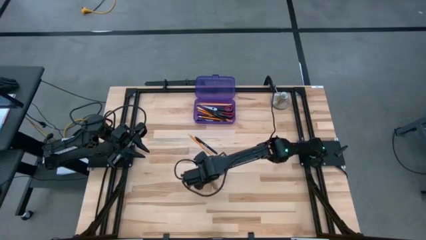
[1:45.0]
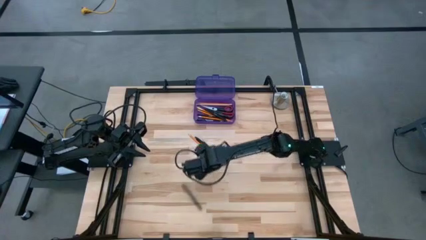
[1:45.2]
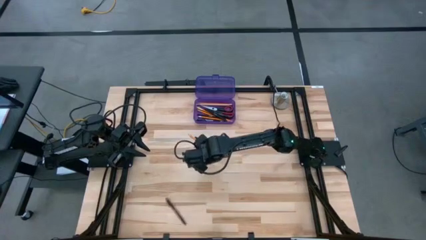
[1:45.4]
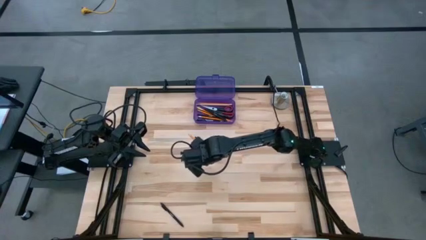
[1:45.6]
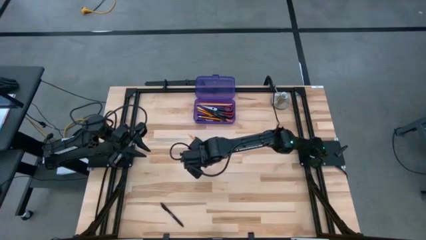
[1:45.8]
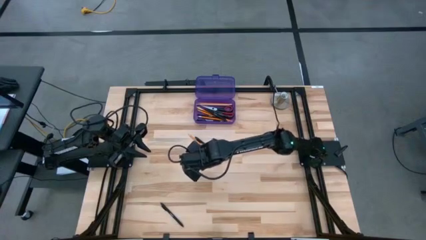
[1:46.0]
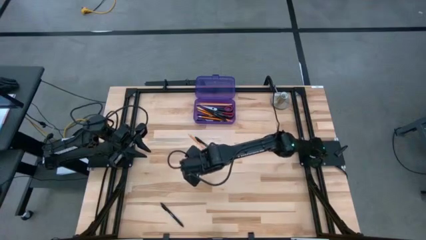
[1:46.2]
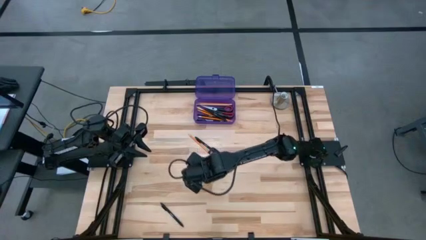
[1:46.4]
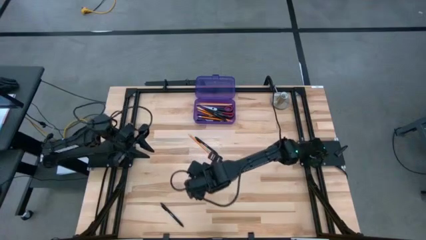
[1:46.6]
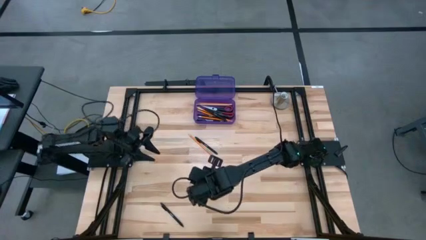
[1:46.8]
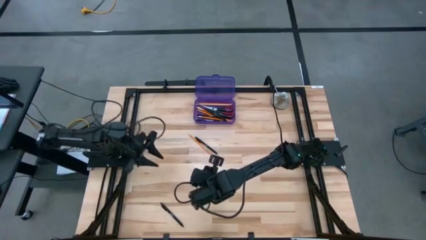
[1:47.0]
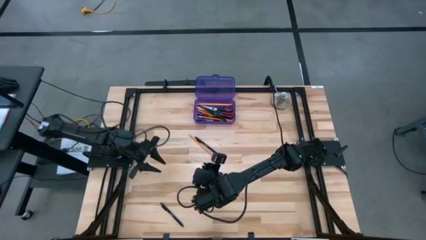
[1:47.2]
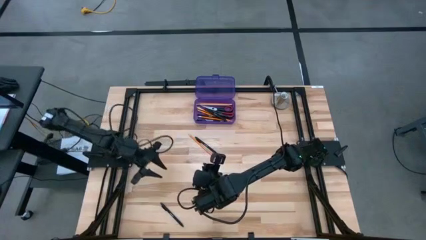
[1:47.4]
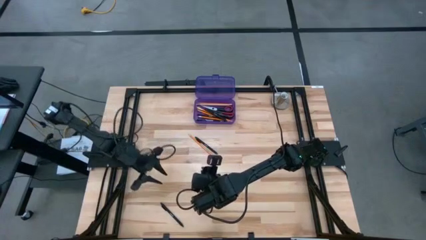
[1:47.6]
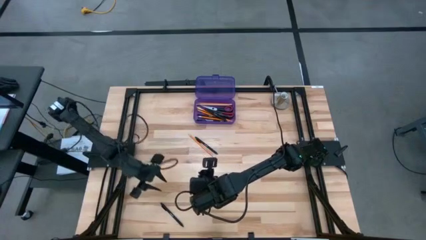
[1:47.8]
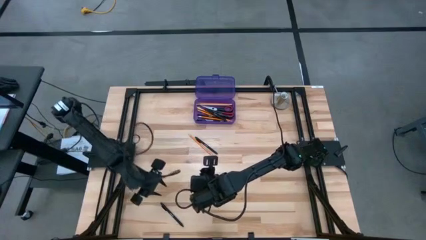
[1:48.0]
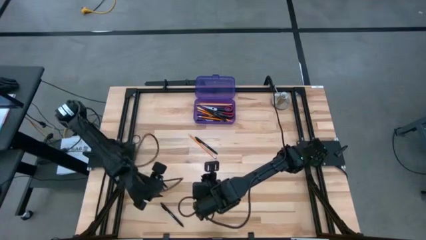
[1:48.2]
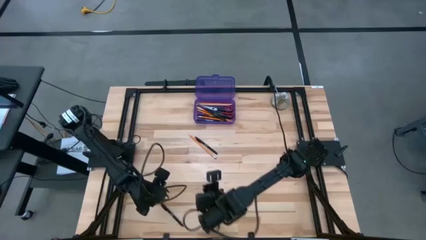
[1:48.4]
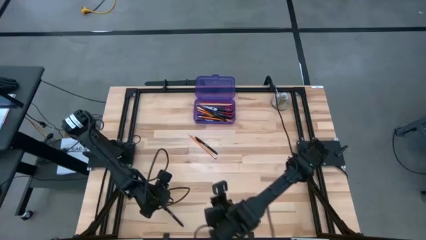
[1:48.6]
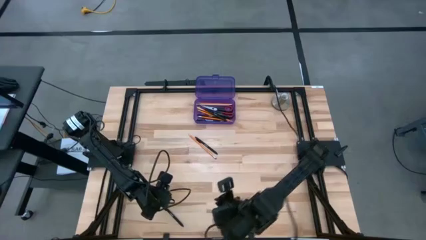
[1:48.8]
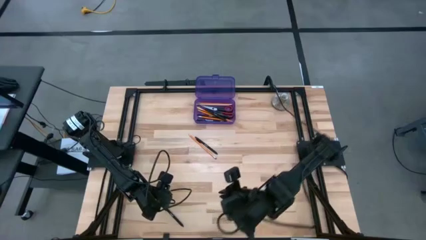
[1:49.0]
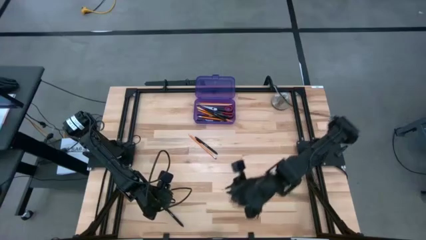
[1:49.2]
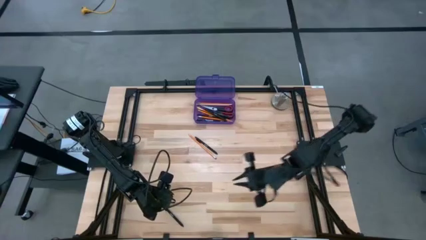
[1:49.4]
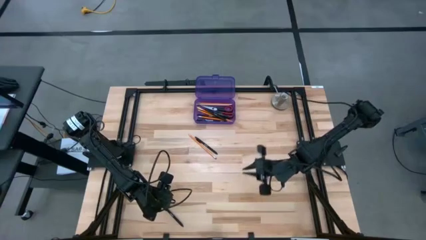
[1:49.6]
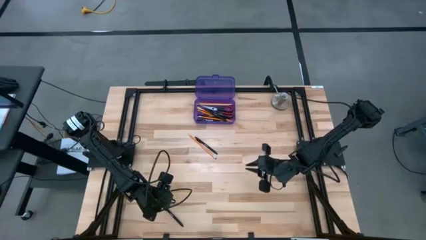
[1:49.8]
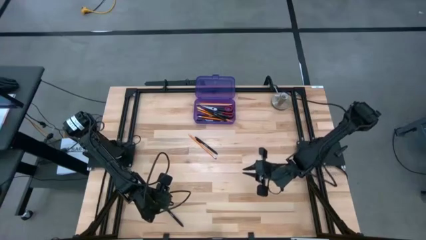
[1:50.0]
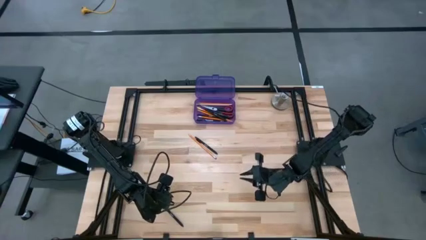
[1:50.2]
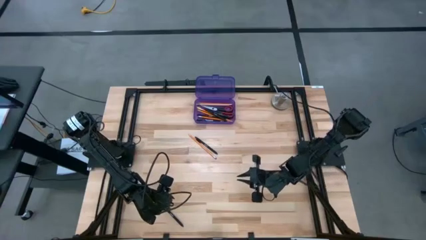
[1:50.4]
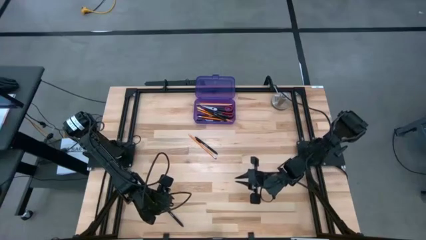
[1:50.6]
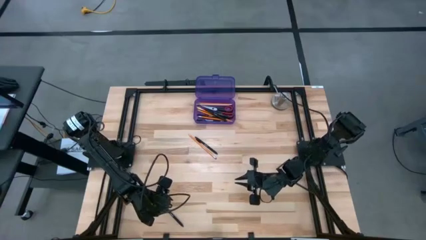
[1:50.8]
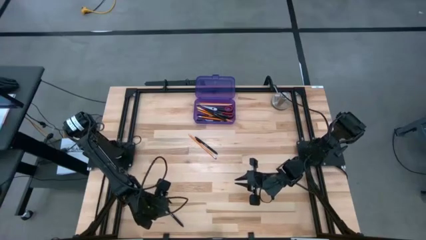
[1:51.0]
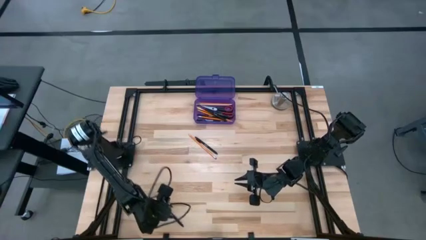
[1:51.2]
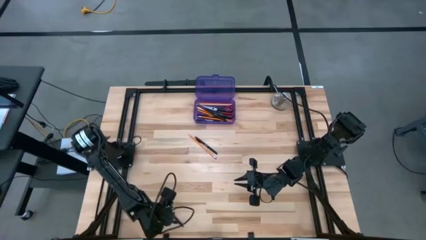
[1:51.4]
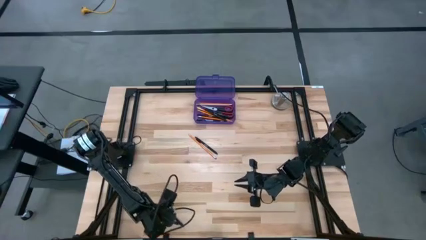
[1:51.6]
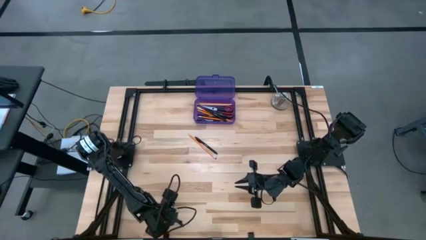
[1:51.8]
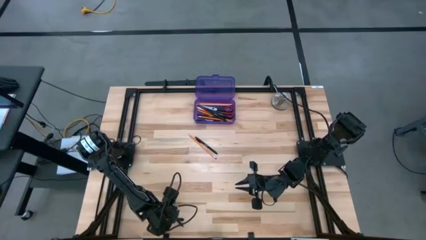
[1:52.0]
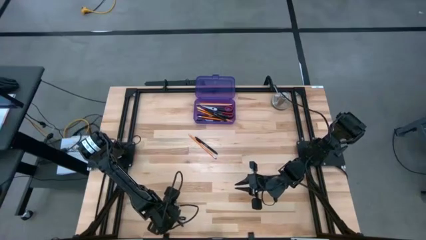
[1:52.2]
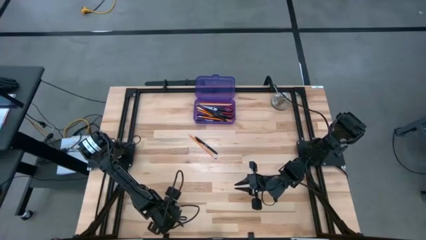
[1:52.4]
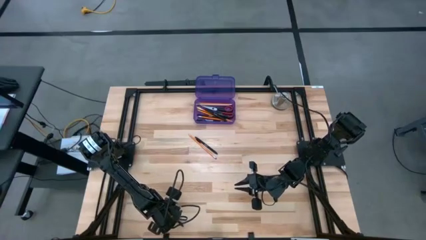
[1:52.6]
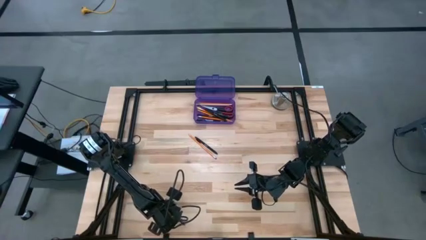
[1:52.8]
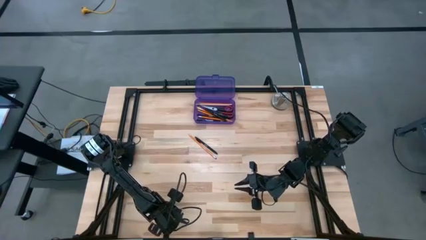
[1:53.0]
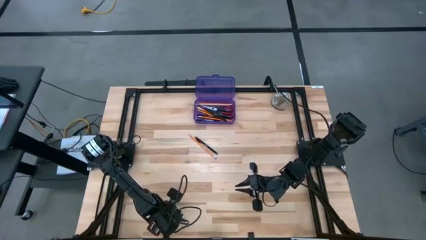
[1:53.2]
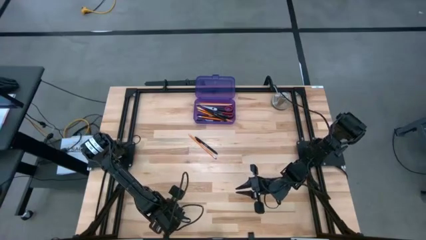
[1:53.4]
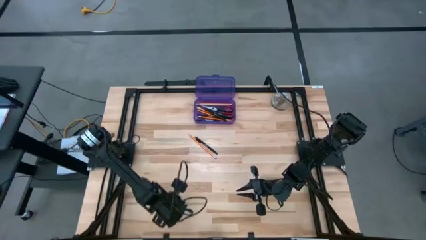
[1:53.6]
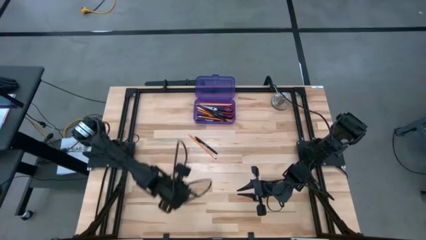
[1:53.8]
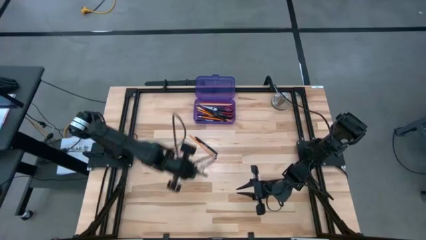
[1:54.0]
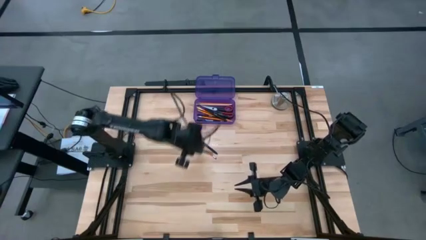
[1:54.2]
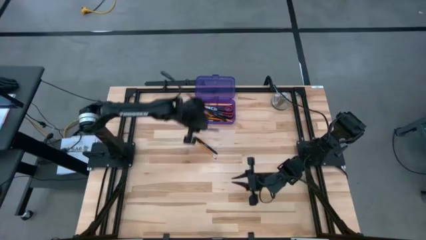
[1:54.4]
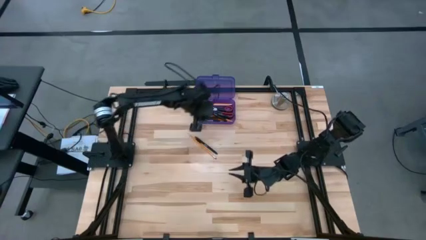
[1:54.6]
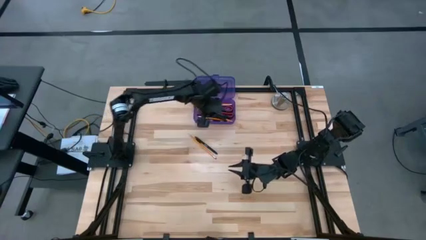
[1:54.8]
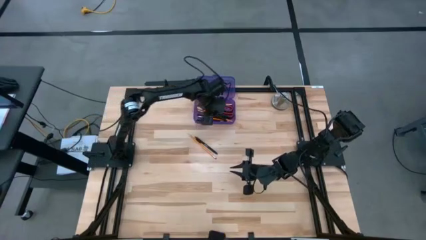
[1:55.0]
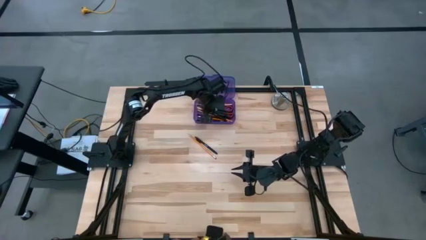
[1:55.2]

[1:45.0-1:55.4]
Task: Pick & place school supplies into a supply box
Put the black pen into the violet supply box

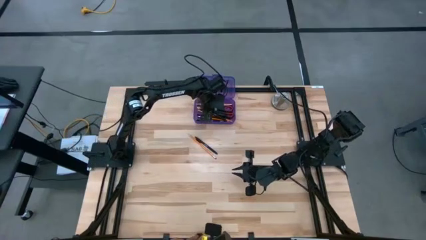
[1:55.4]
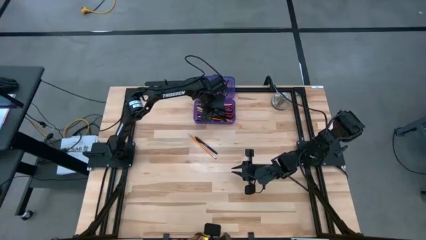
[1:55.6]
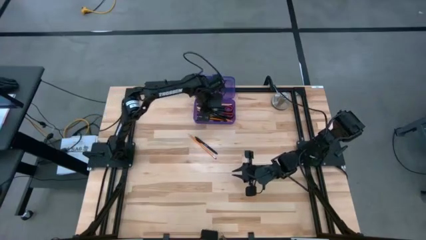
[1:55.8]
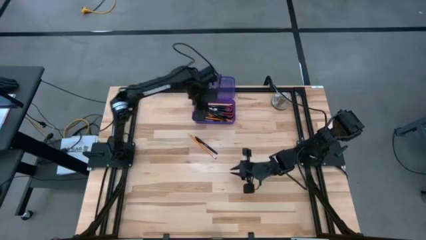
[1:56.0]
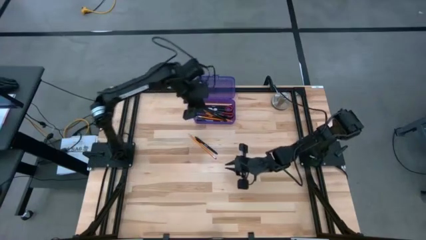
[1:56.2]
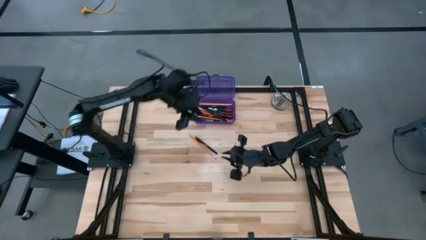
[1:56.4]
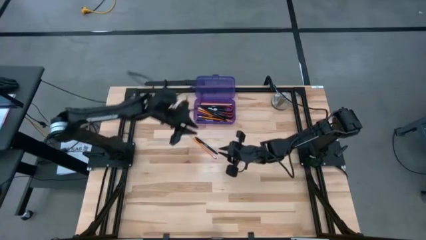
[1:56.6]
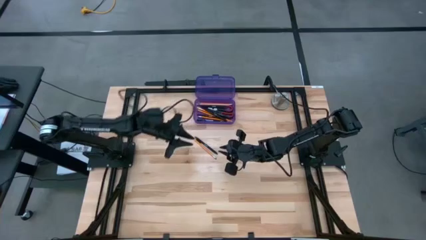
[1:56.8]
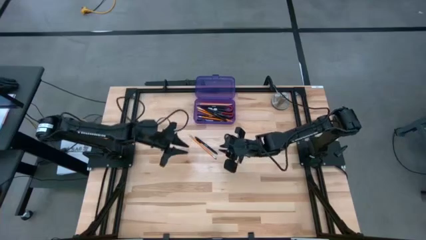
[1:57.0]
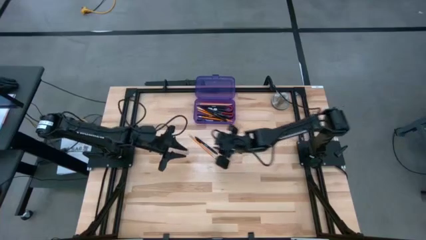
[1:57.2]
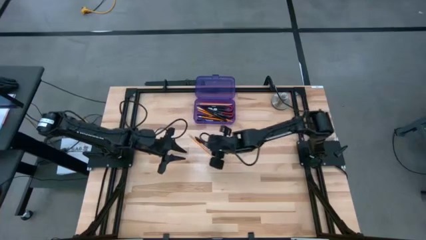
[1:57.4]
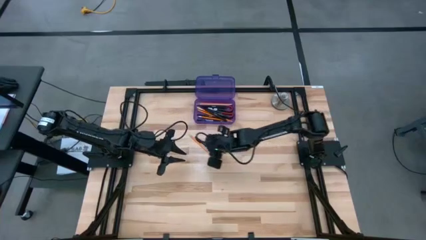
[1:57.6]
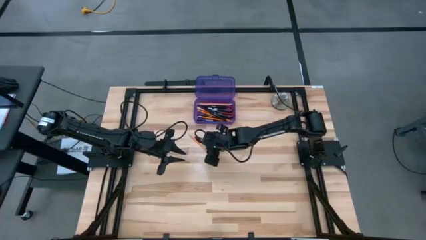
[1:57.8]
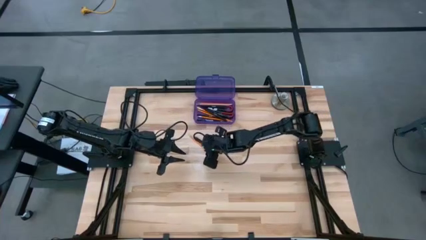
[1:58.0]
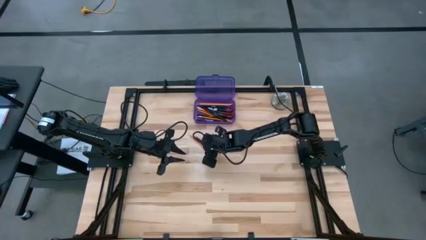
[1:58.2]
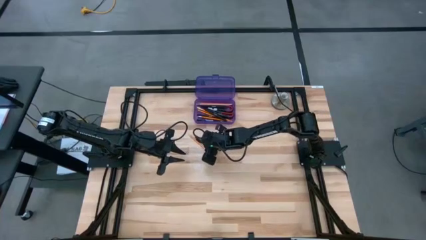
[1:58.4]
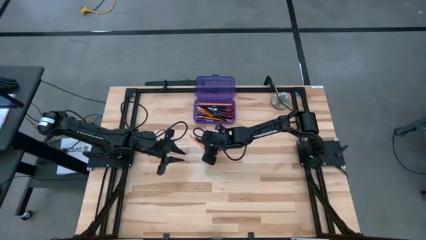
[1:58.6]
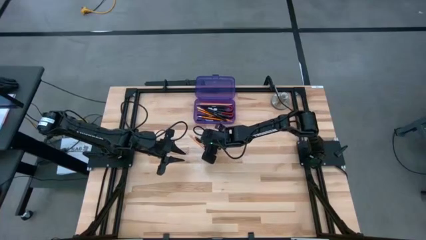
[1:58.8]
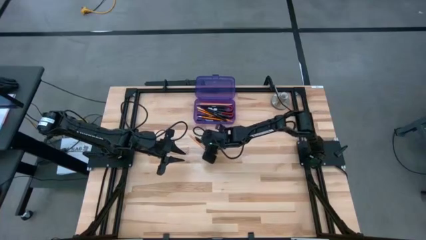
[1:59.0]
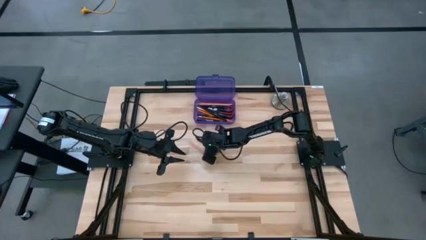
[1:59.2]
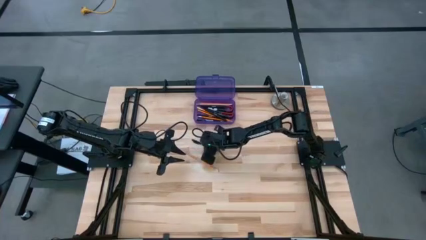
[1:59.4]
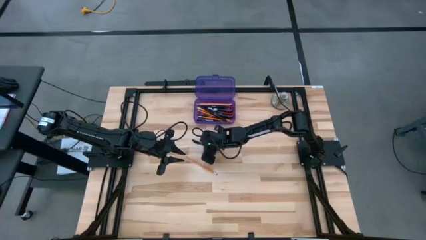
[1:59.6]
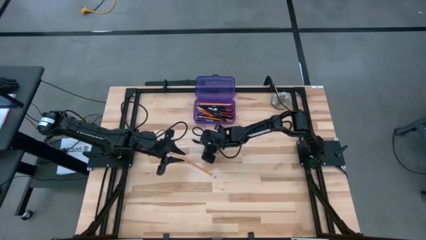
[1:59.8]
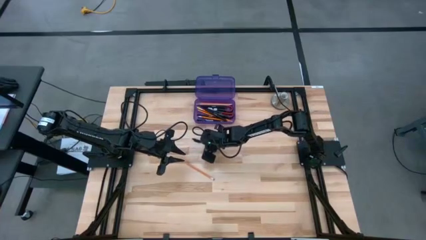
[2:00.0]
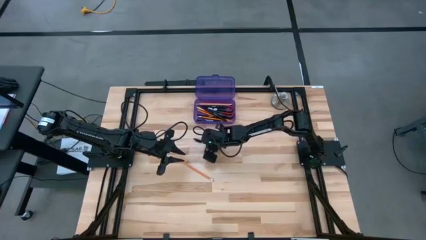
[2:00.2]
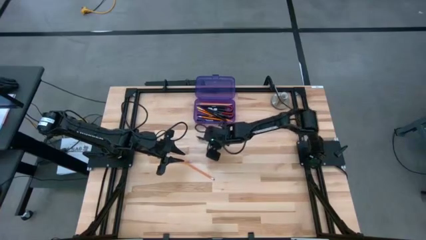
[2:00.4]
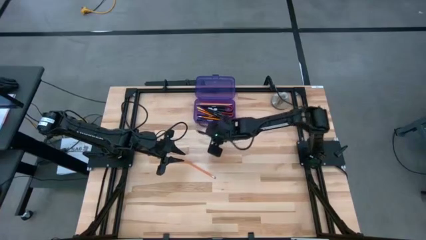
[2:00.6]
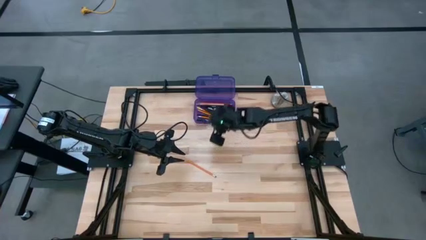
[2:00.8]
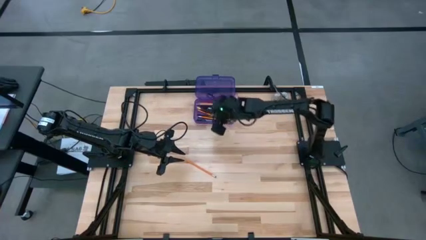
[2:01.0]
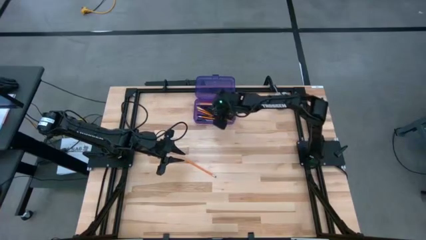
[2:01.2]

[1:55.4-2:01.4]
Put the black pen into the violet supply box
